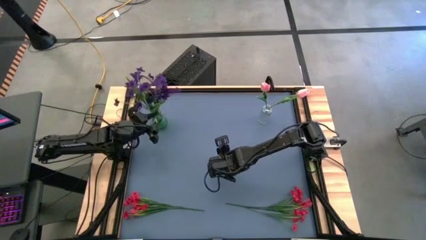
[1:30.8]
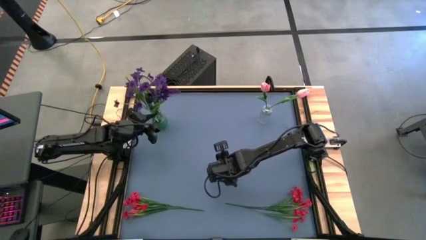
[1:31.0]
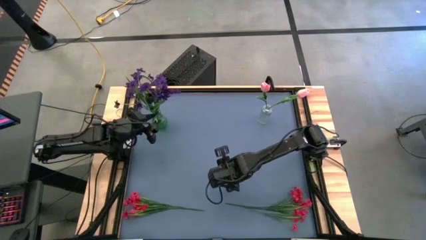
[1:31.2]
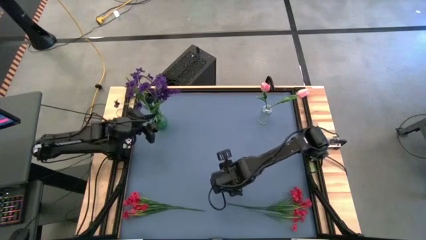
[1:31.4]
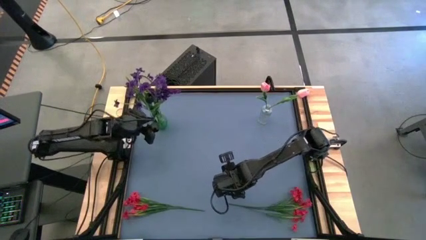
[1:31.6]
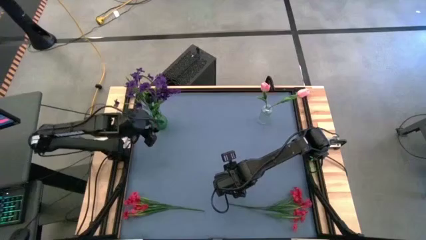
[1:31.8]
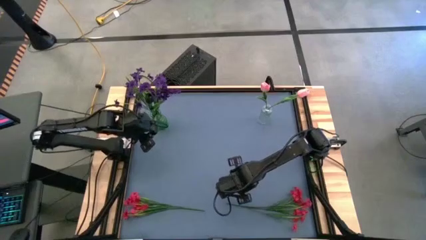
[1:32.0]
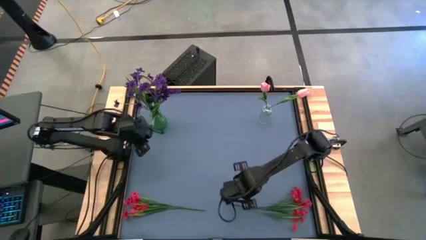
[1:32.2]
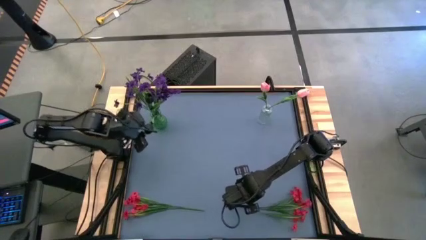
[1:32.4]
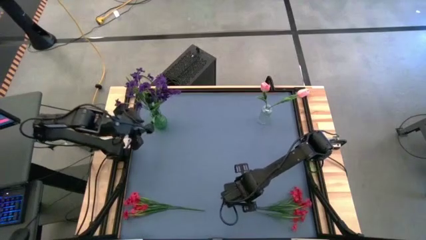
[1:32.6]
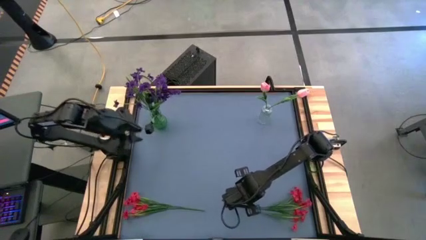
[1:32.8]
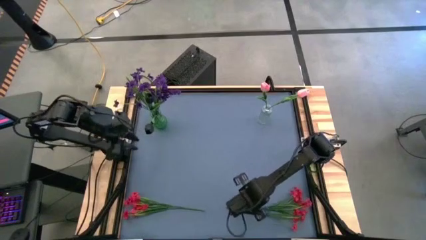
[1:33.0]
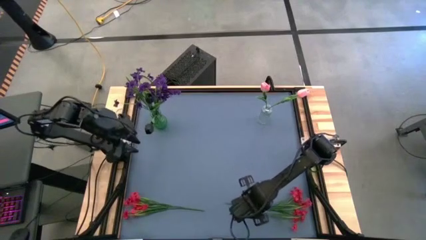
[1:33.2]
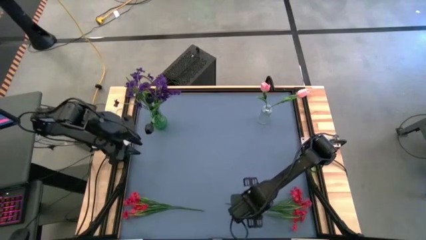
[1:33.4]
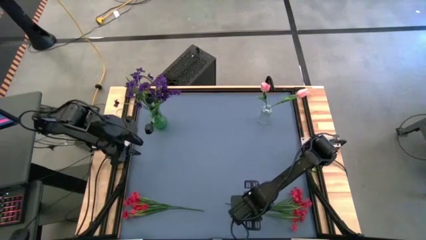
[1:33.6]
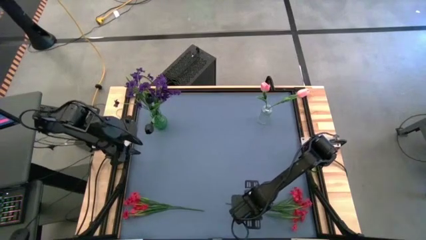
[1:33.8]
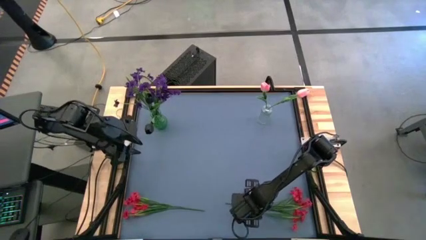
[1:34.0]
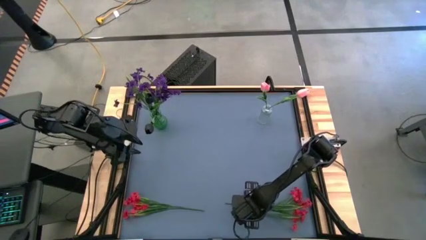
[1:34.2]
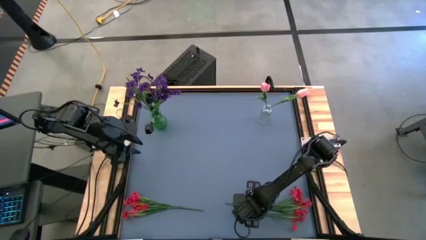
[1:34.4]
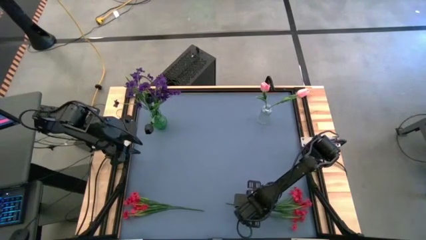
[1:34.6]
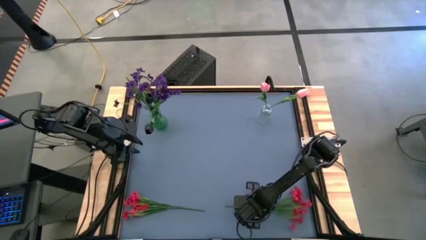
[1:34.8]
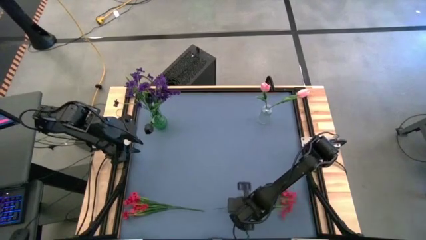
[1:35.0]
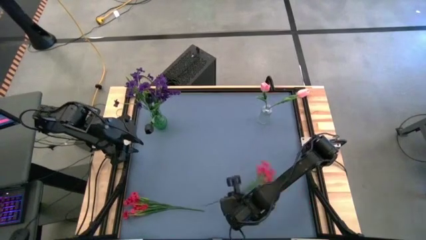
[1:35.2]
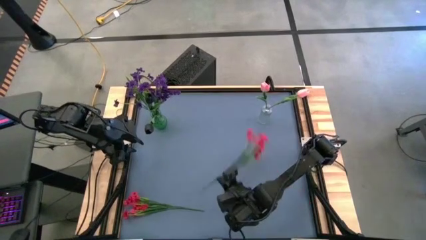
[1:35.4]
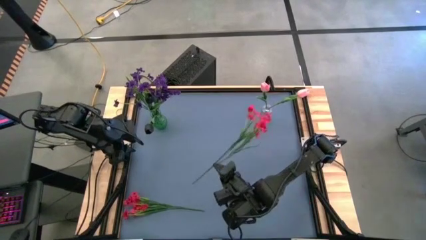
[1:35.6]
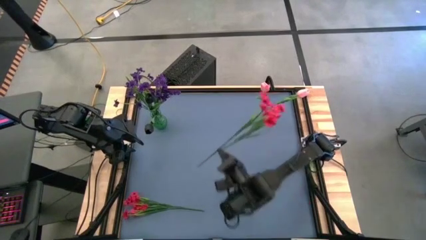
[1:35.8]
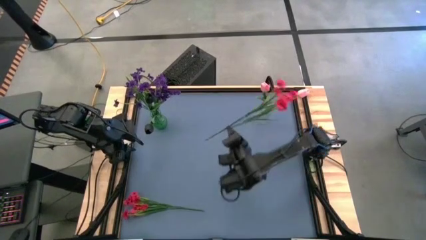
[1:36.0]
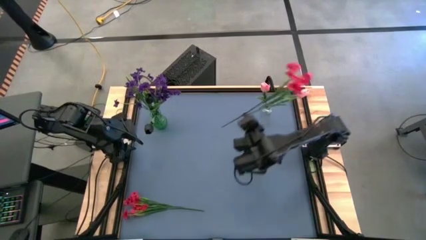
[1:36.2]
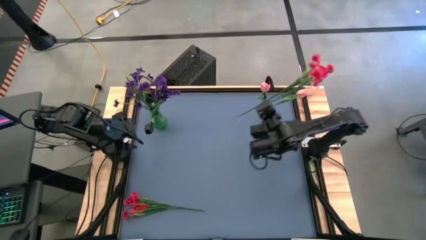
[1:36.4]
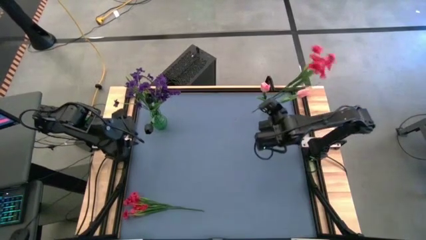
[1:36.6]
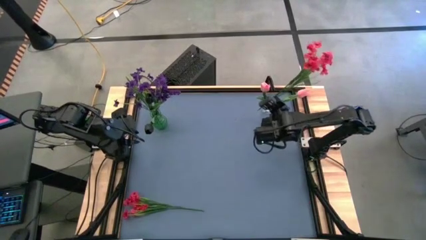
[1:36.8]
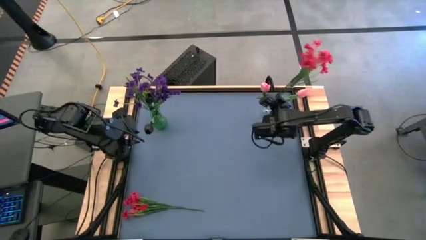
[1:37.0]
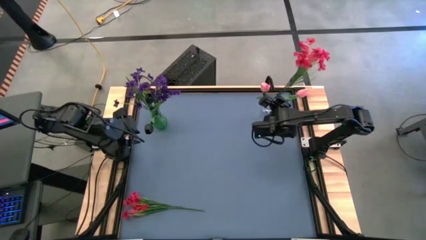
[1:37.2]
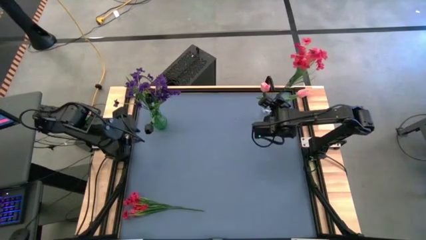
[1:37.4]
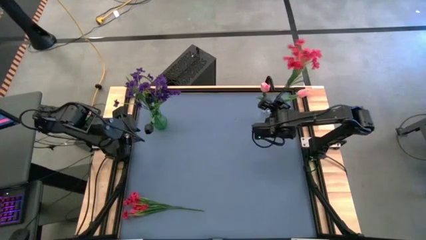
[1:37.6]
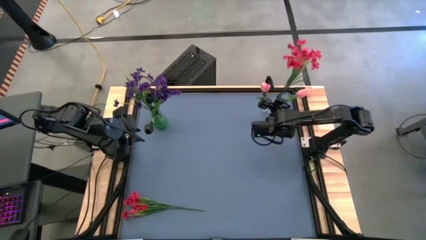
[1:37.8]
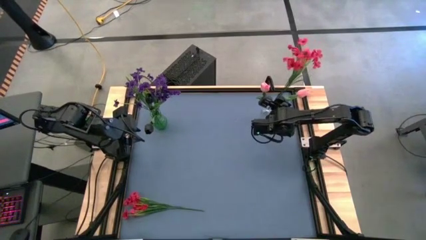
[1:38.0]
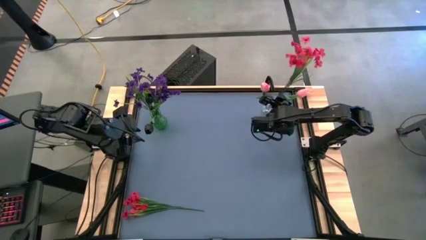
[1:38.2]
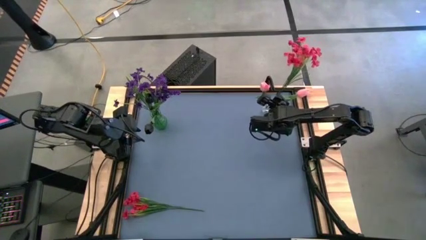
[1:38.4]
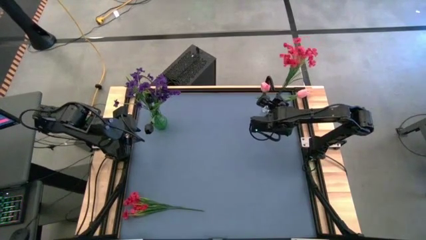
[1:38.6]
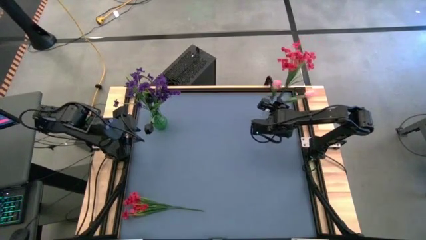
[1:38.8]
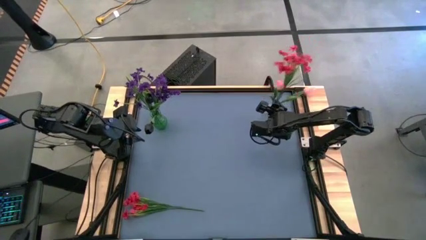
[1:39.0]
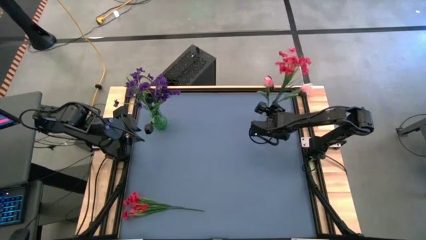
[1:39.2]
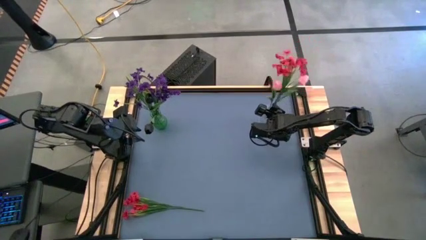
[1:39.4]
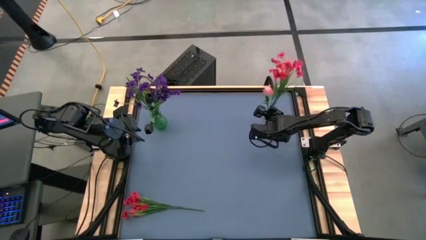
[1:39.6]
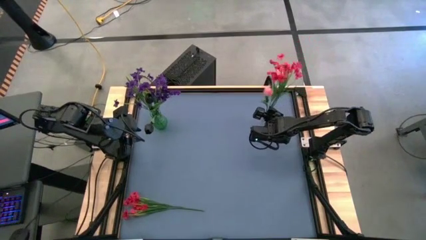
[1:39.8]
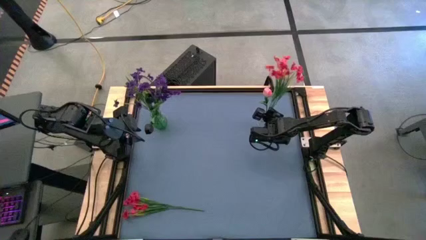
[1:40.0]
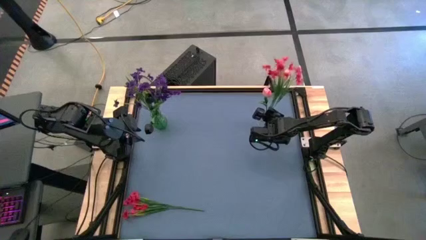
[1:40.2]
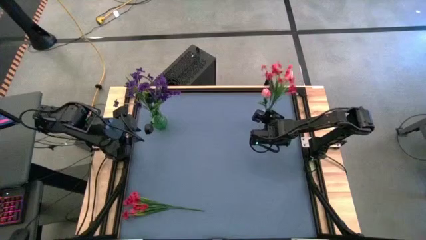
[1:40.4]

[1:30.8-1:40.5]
Task: Sort flowers into vase by color
Put the right red flowers into the transparent vase

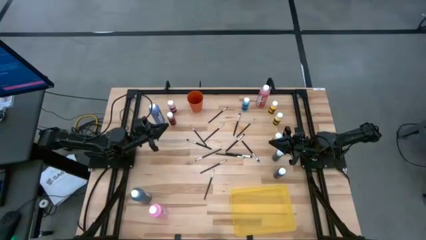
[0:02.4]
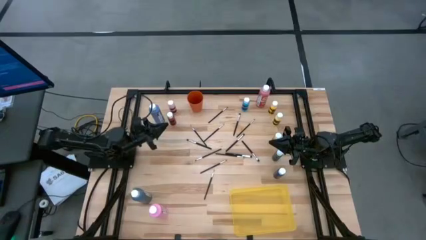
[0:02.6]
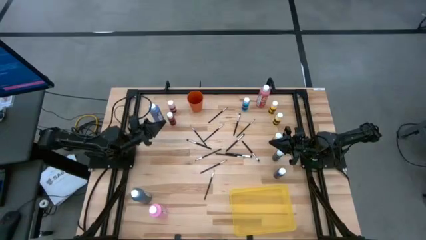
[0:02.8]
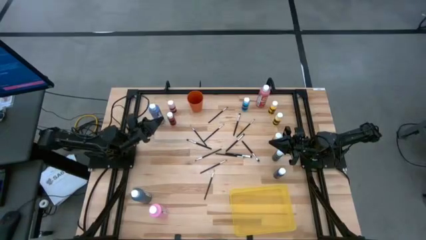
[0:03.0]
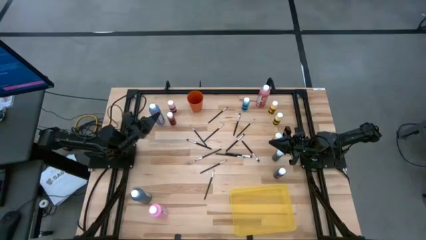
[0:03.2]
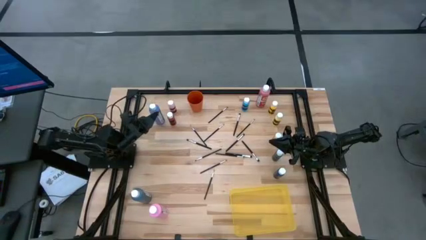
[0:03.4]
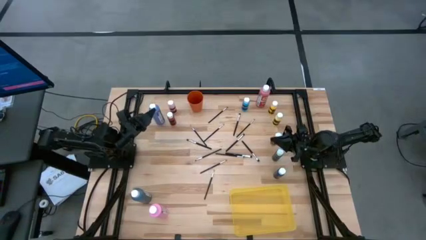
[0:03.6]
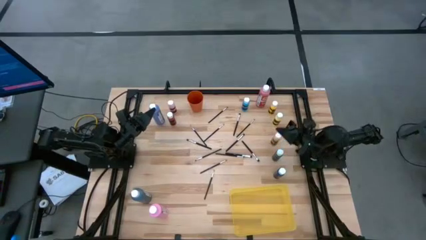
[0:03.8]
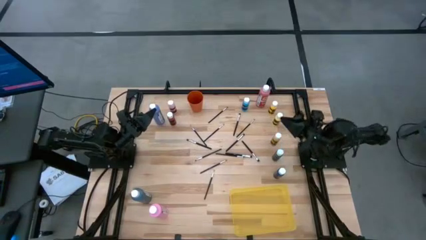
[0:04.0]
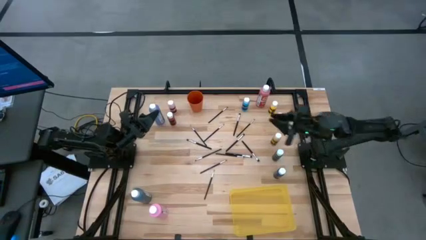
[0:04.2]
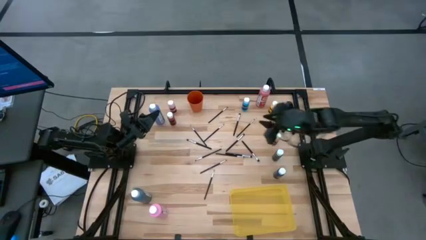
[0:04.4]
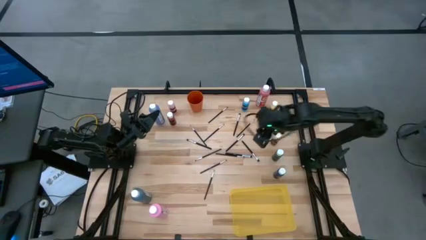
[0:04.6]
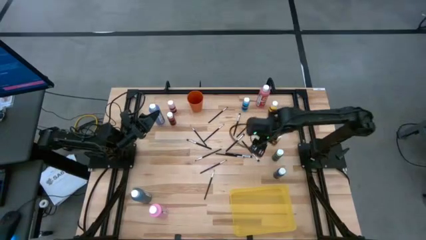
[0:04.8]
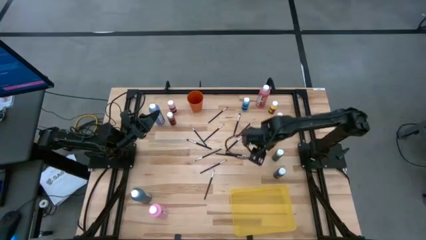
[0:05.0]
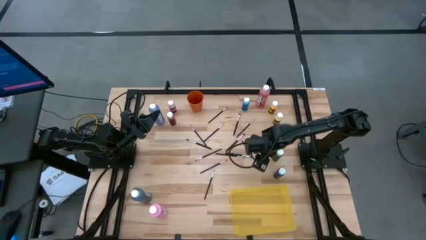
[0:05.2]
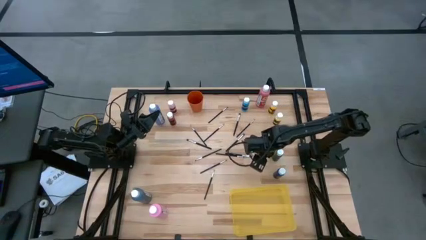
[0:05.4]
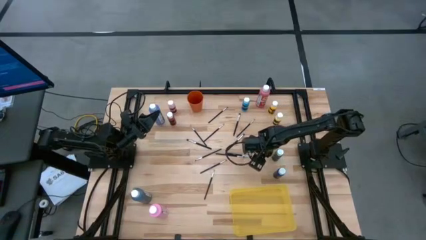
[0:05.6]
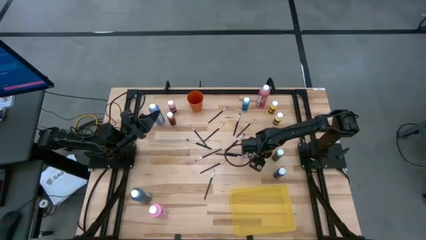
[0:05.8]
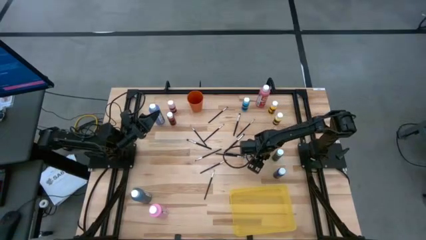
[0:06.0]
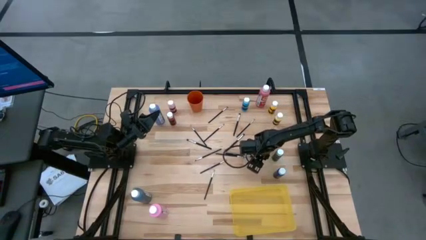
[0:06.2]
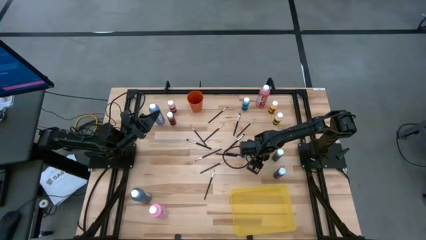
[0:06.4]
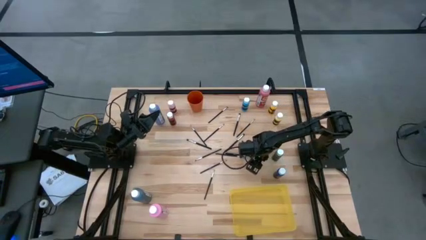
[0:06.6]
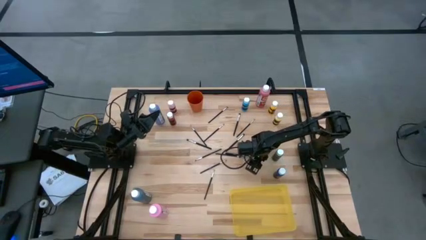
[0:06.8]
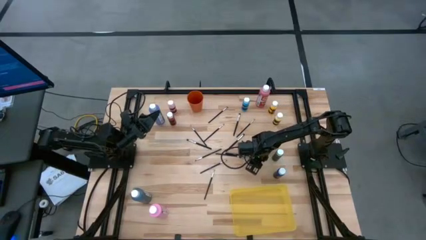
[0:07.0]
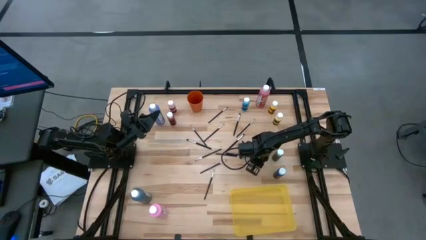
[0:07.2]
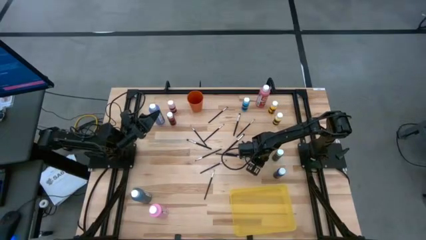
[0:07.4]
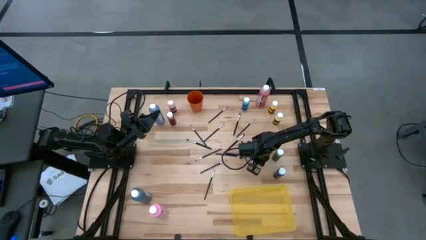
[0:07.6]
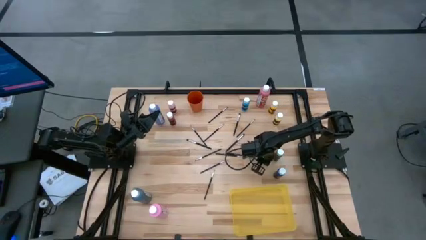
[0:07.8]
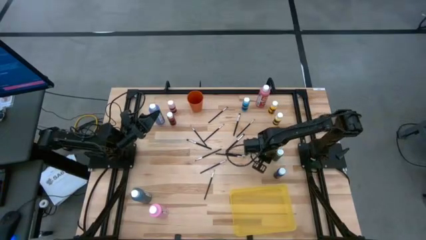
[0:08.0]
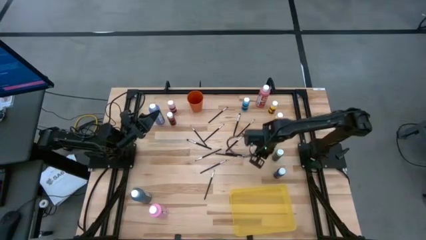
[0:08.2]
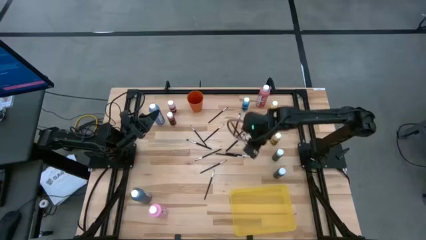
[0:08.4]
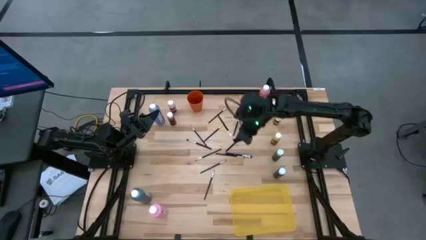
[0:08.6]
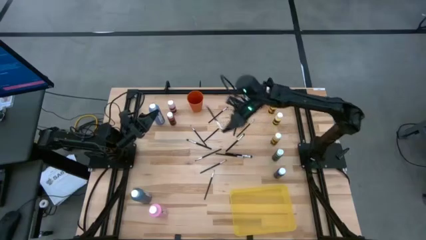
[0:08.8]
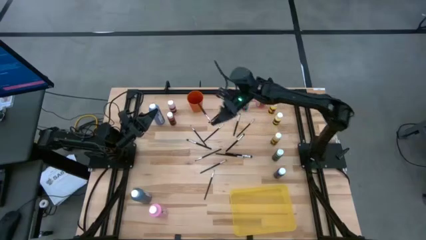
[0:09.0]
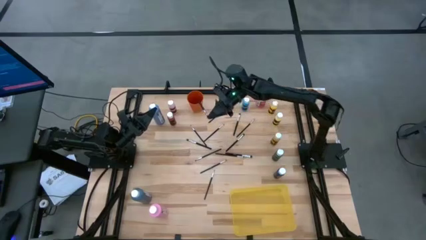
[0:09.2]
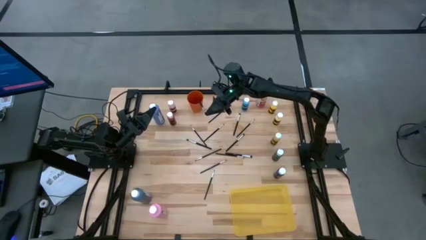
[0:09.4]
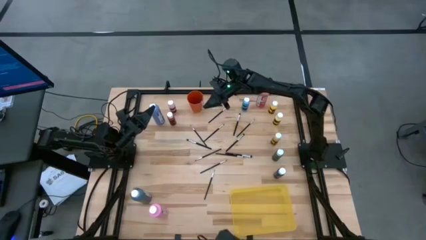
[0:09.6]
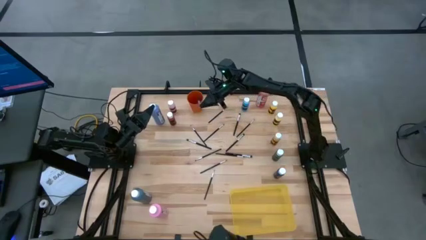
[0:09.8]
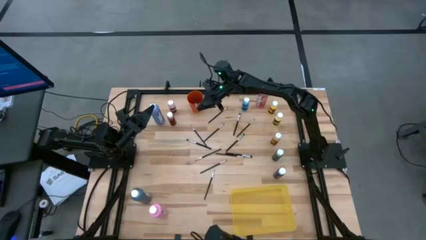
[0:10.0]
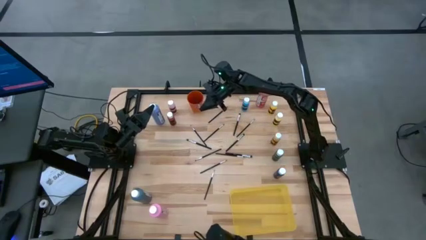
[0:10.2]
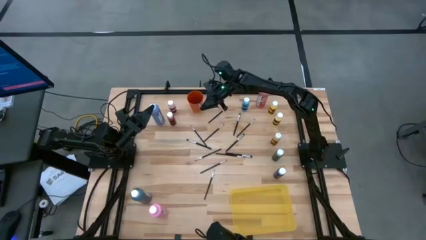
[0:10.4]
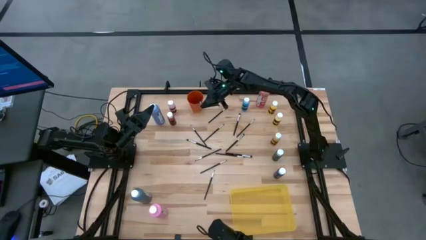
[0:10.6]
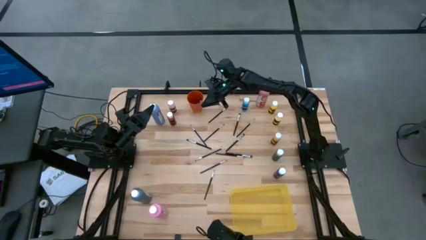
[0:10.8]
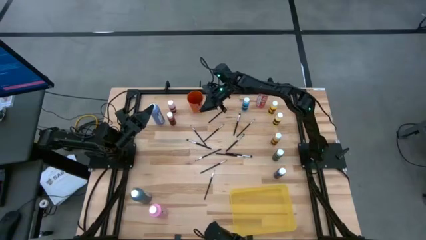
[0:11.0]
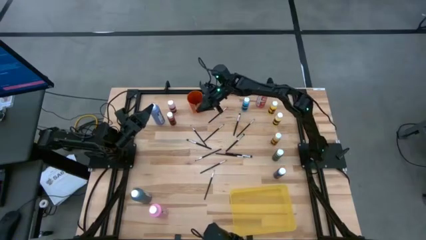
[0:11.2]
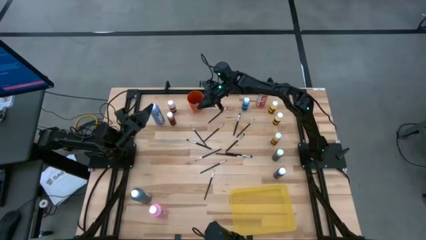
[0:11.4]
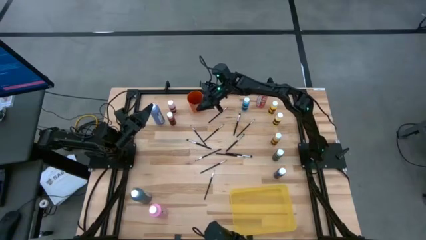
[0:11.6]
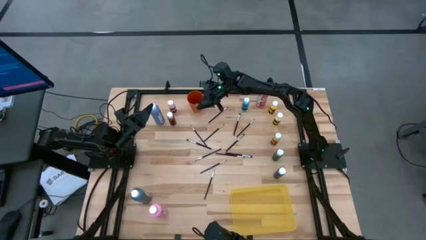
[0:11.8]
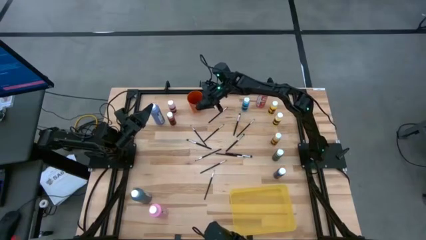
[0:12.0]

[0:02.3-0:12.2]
Task: Pick & Place Paint Supplies
Put the black paint brush into the orange cup
